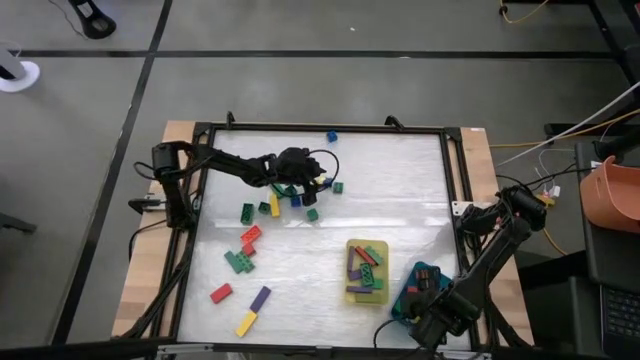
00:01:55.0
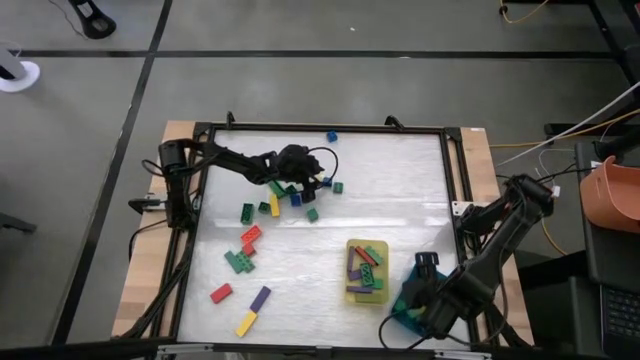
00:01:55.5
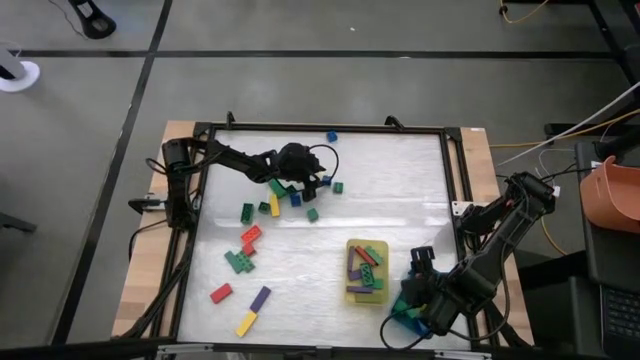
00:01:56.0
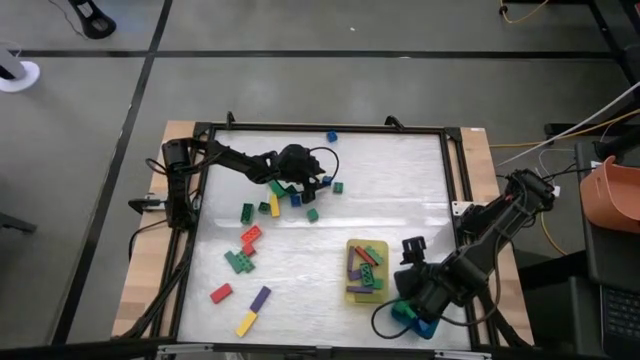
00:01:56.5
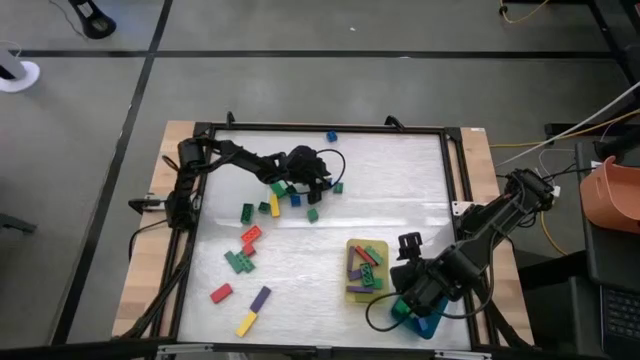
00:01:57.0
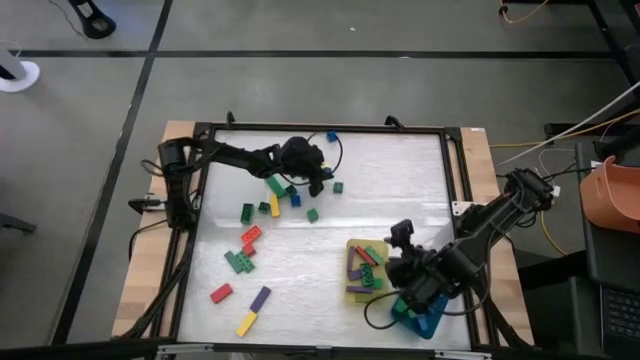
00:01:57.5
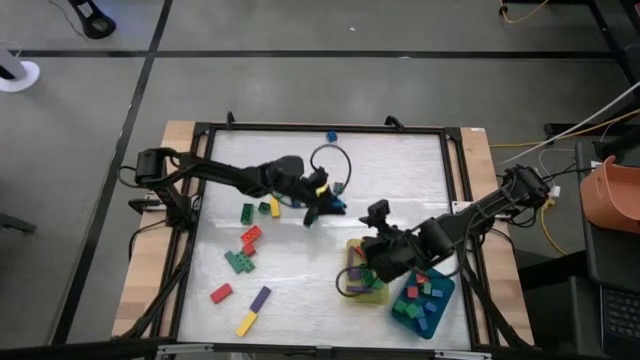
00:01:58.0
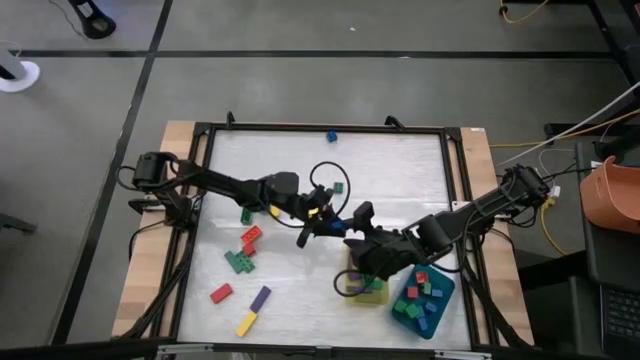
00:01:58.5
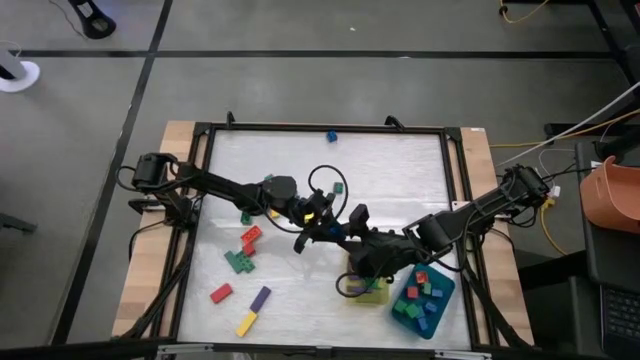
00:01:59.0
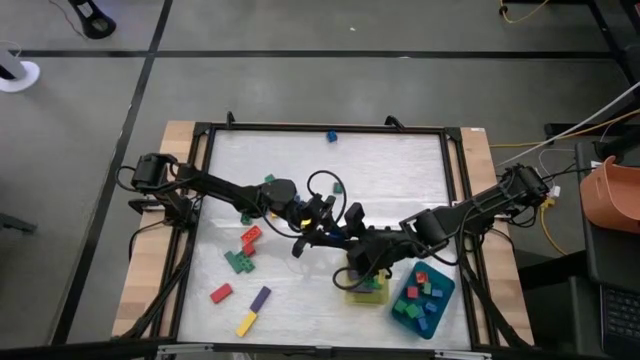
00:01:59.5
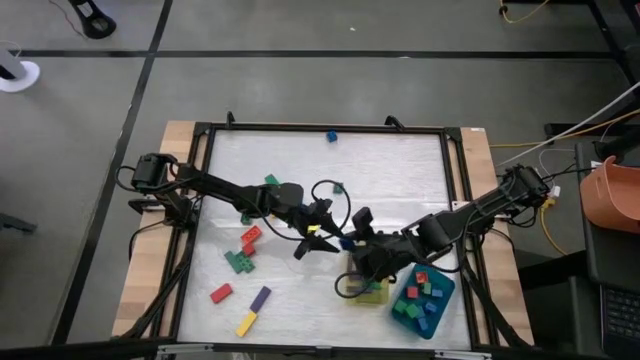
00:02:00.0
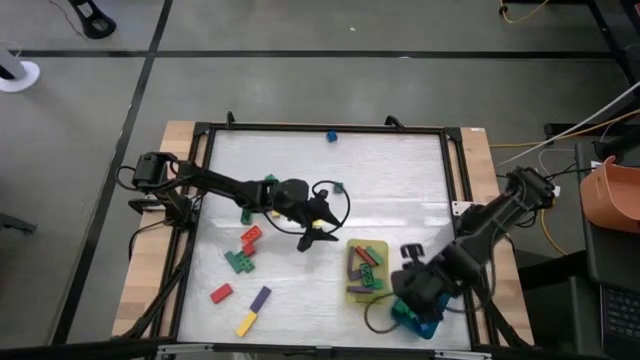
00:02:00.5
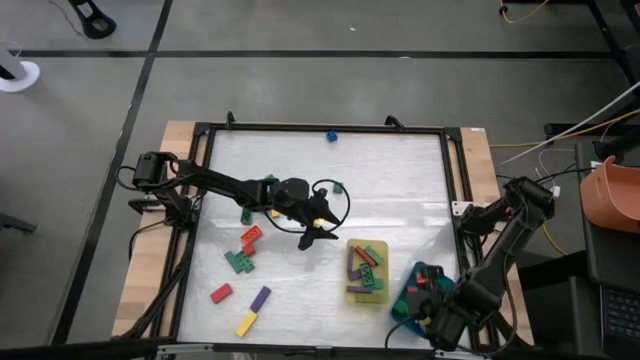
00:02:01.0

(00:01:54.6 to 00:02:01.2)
Task: Sort blocks by size
Put the small blue game piece into the blue bin

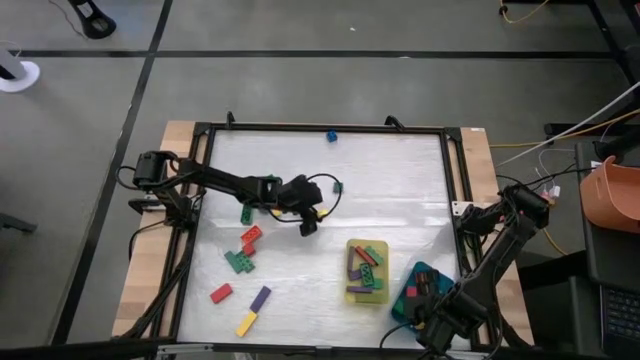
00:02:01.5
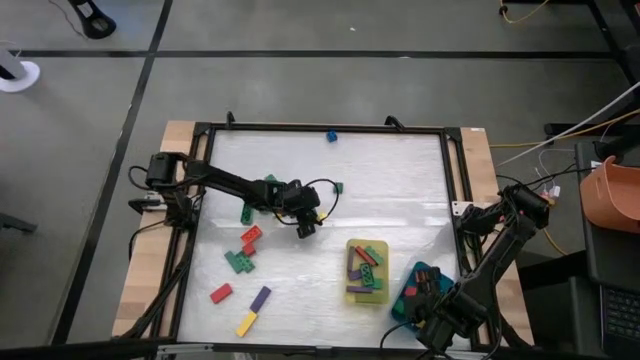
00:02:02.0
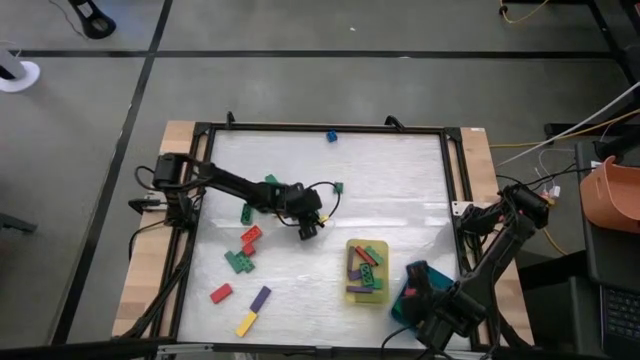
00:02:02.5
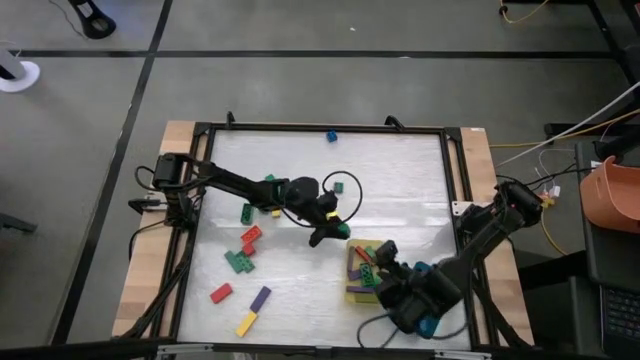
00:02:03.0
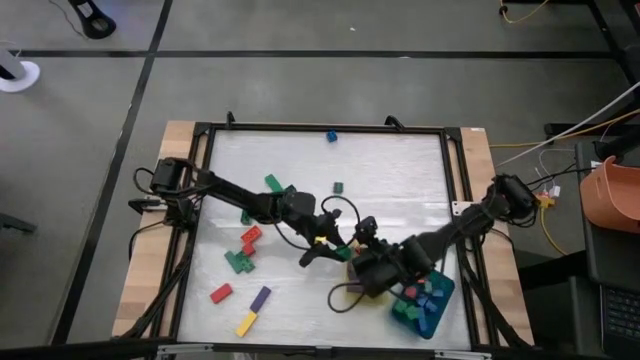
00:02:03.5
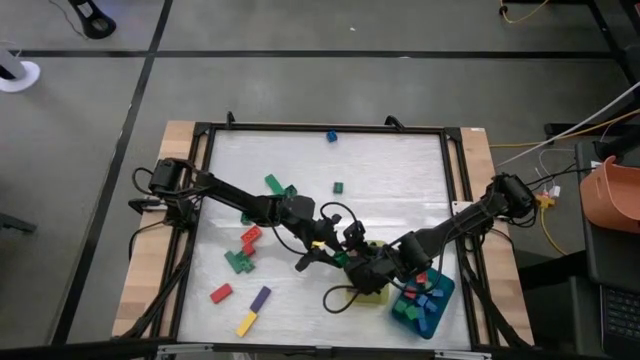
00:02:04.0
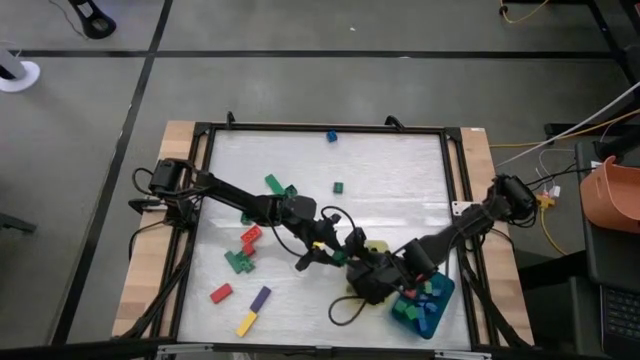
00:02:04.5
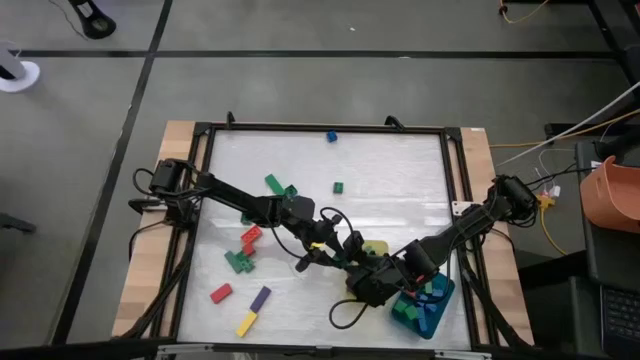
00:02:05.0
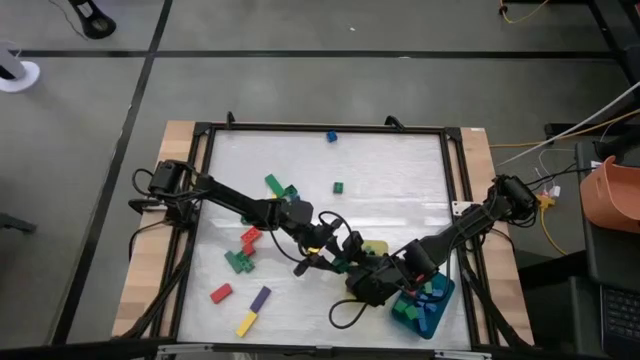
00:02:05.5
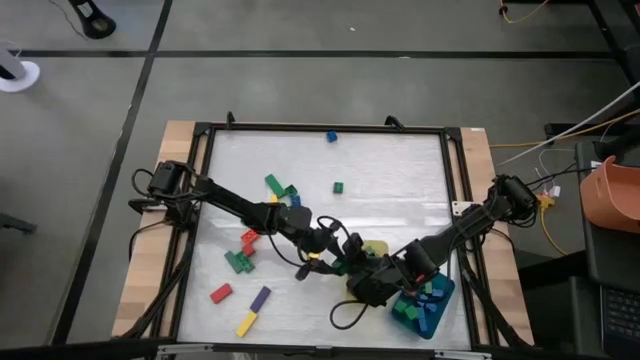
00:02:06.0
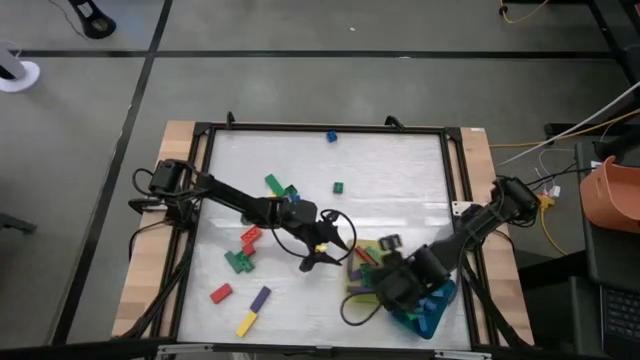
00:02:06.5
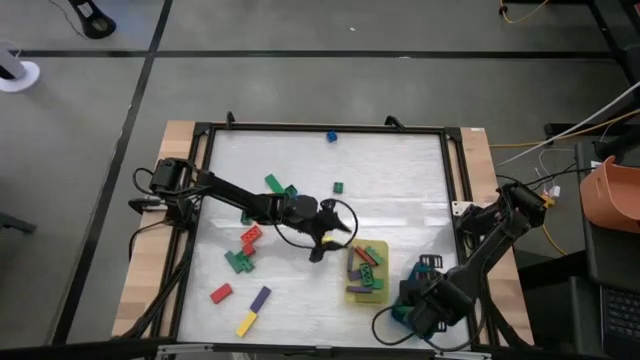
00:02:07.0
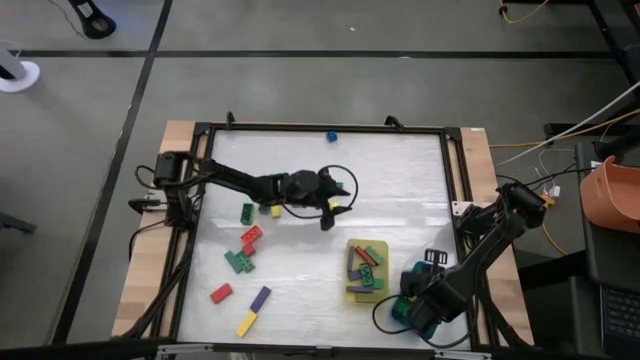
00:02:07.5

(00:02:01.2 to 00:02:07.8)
Put the small green block into the blue bin

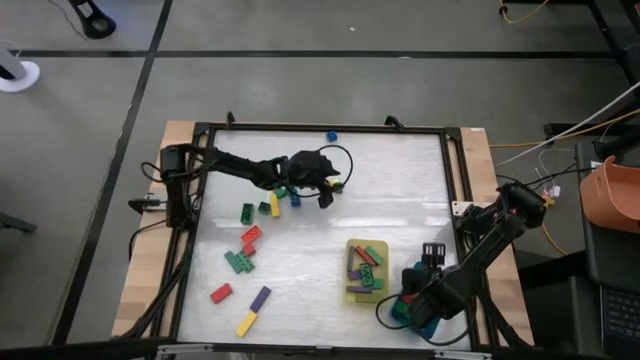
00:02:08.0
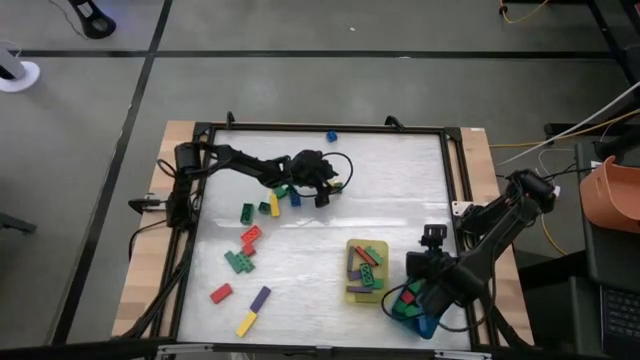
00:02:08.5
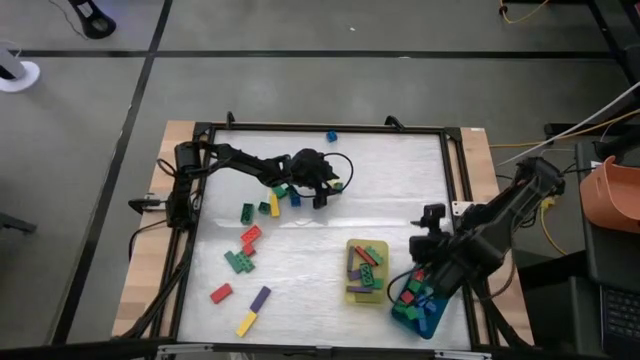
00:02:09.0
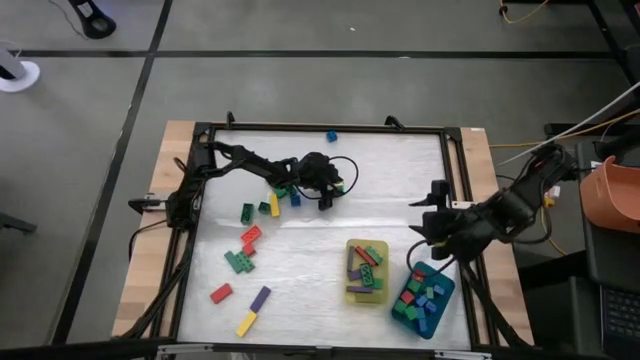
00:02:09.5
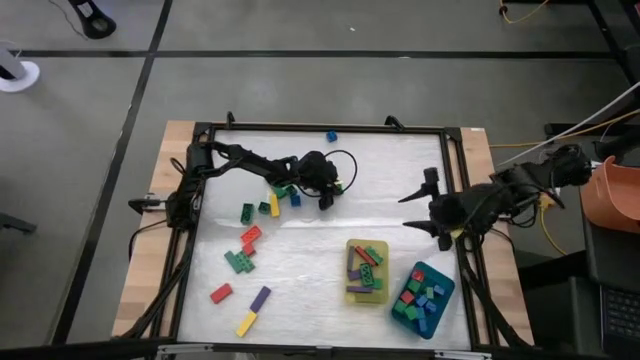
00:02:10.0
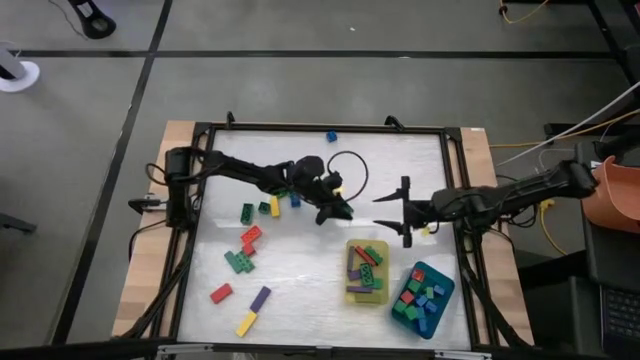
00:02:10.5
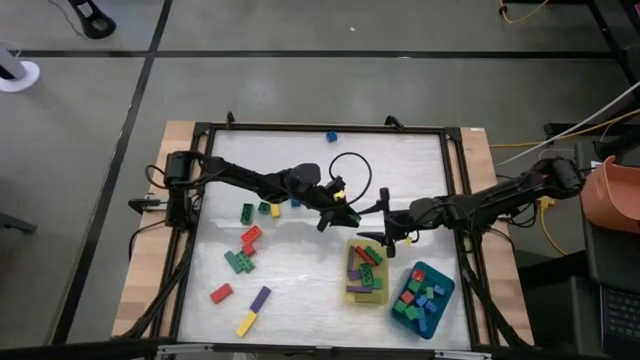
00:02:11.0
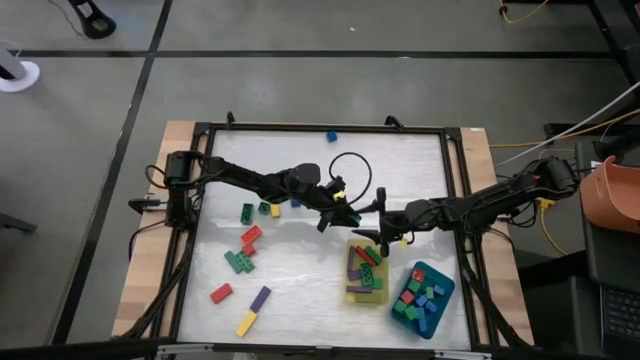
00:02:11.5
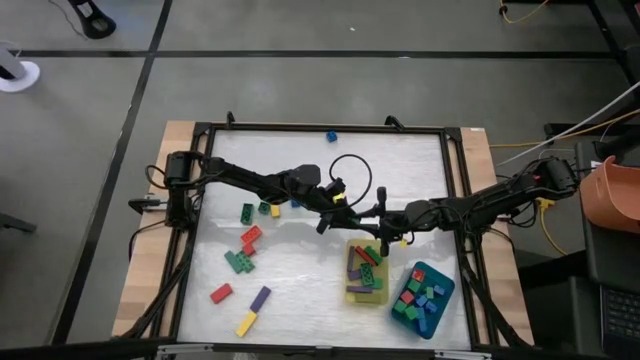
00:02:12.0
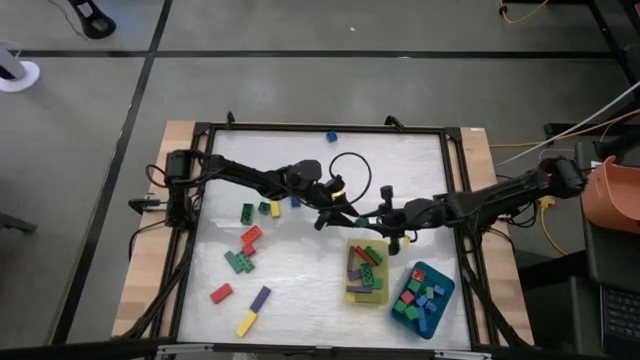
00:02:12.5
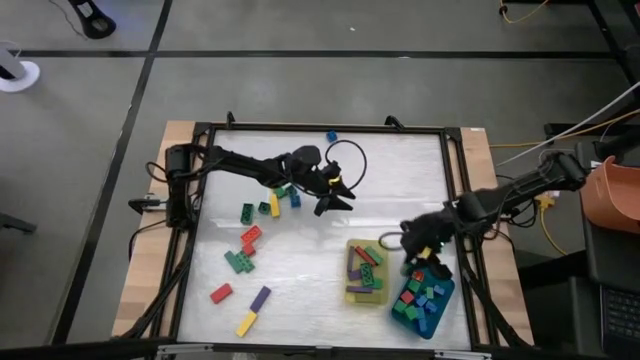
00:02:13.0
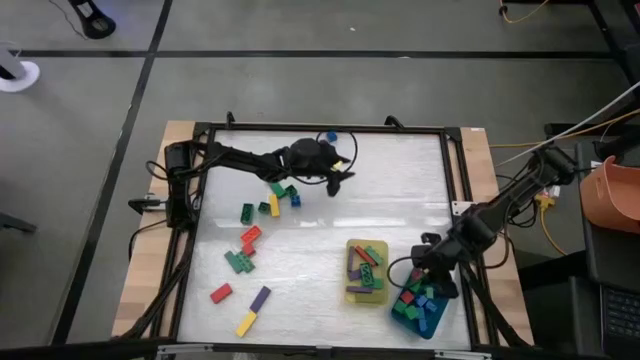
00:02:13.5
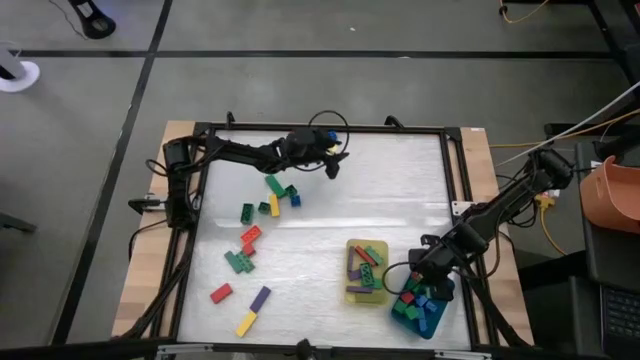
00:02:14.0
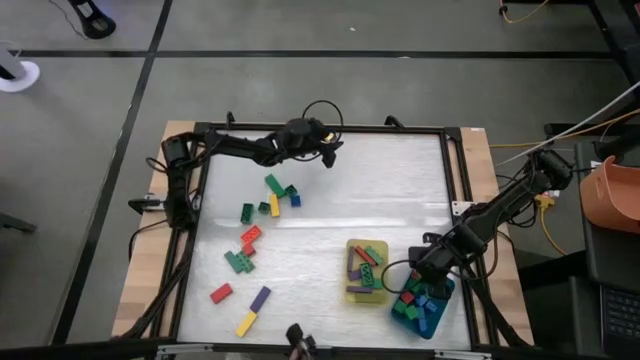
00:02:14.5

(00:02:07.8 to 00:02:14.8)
Put the small green game piece into the blue bin

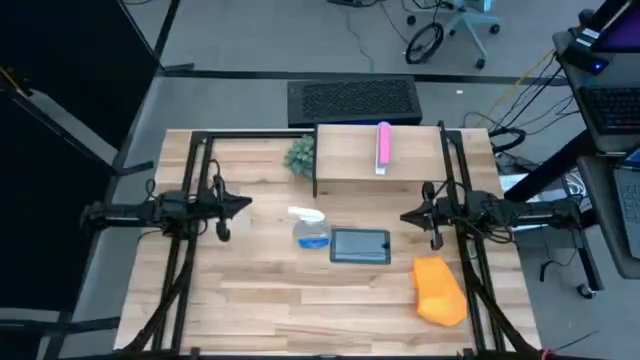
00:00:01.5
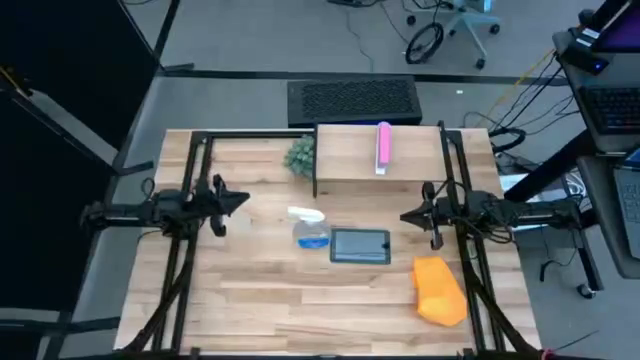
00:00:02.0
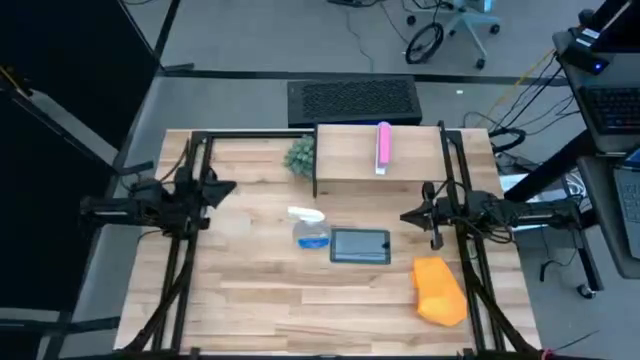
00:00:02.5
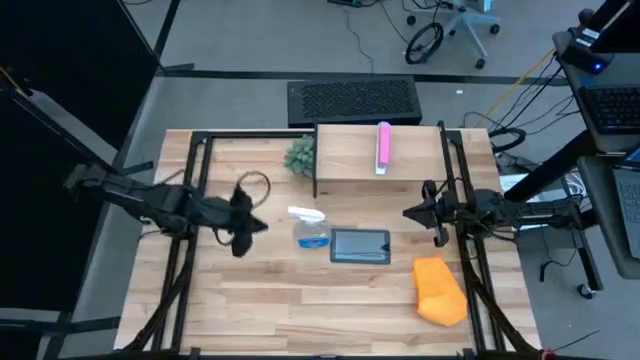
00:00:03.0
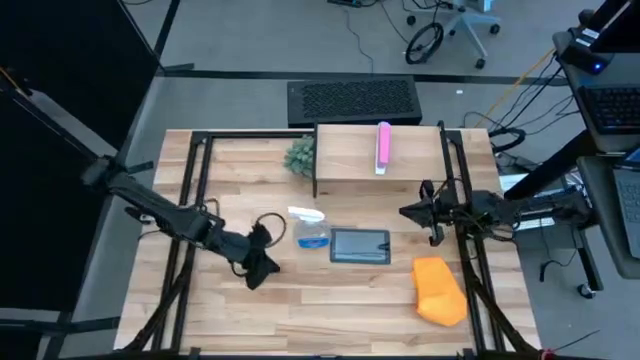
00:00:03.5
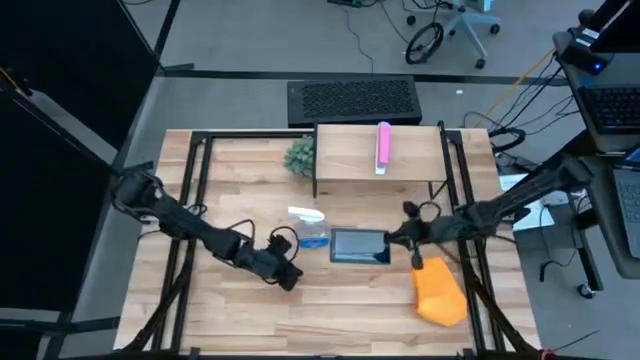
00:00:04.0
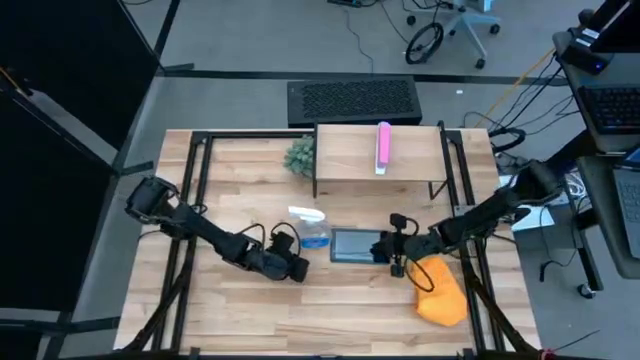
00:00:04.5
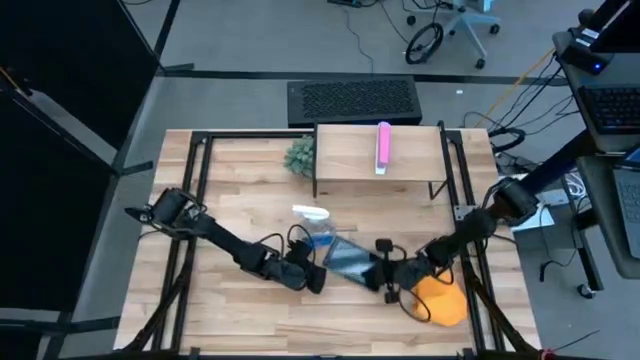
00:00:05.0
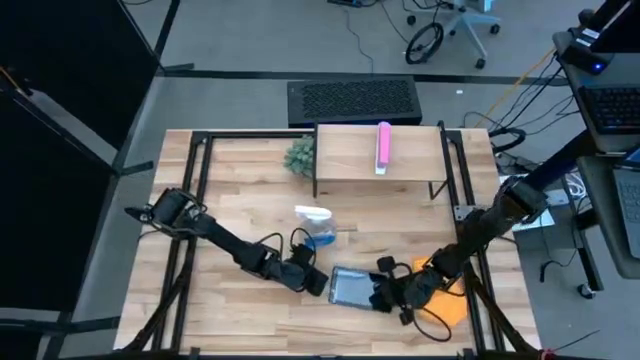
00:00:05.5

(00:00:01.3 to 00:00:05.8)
Task: Apply microfiber cloth
Move the tablet to the bottom
